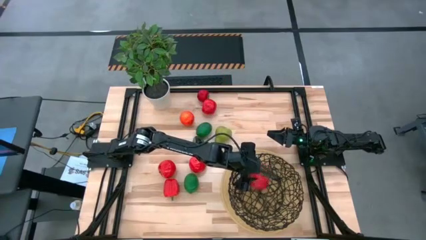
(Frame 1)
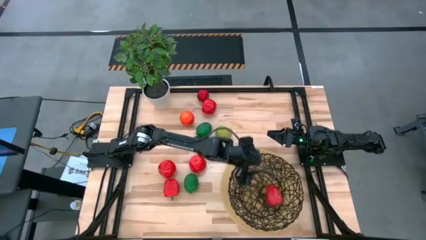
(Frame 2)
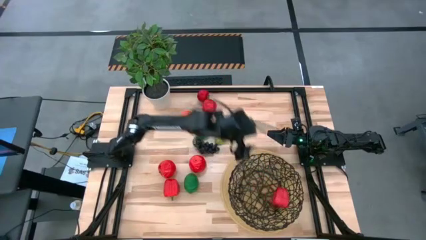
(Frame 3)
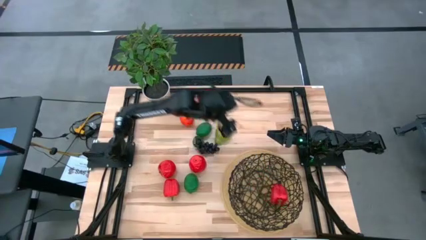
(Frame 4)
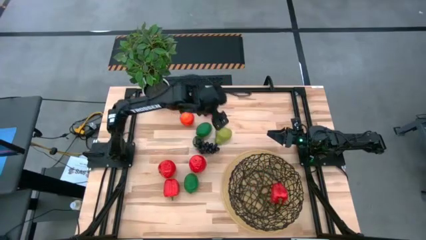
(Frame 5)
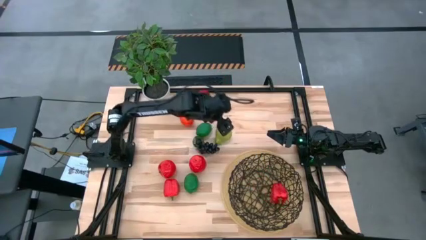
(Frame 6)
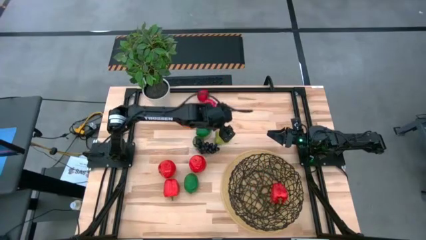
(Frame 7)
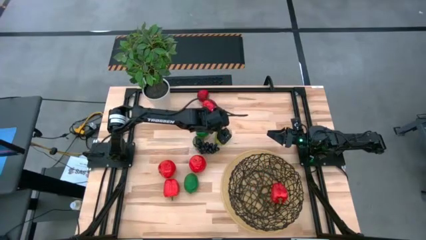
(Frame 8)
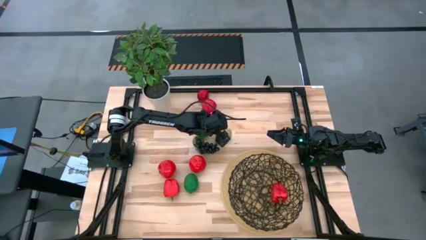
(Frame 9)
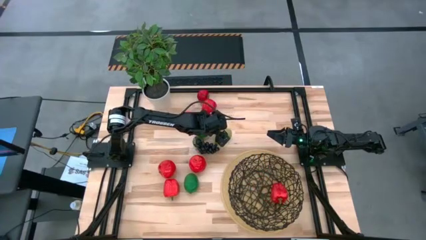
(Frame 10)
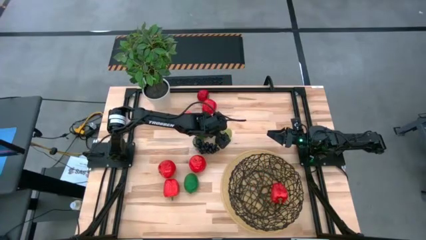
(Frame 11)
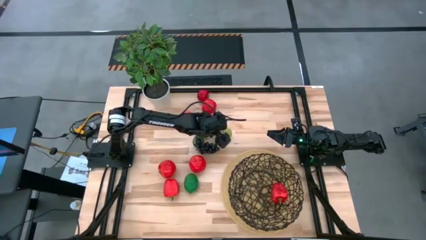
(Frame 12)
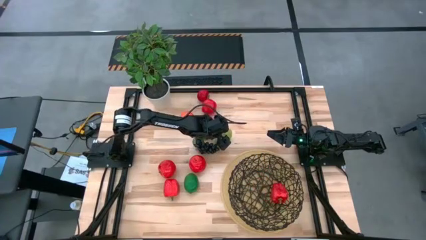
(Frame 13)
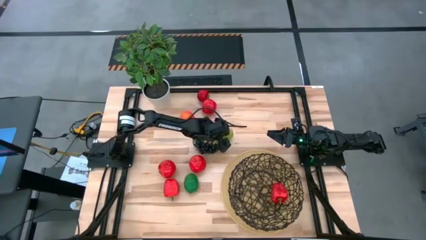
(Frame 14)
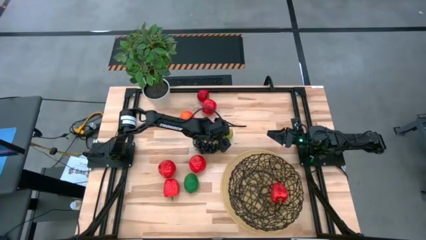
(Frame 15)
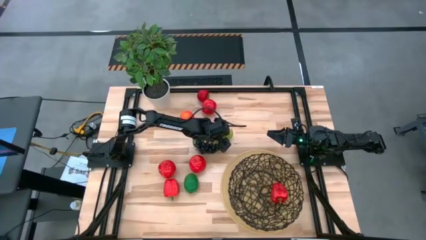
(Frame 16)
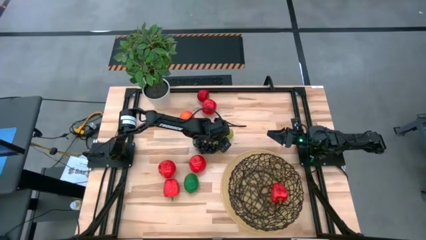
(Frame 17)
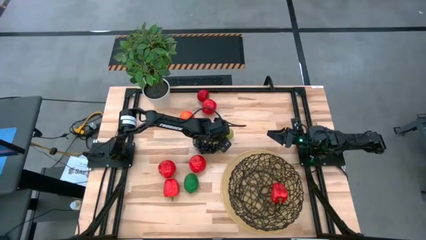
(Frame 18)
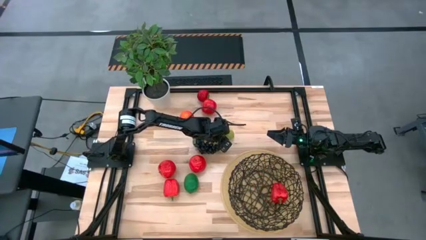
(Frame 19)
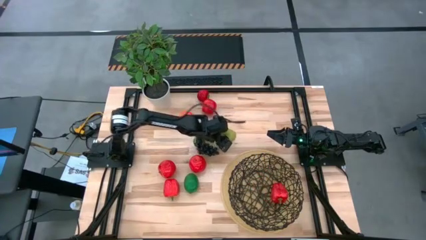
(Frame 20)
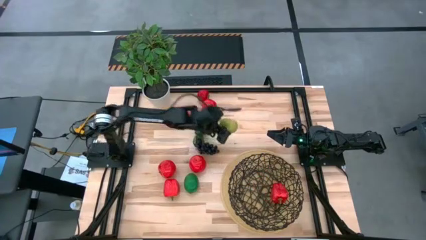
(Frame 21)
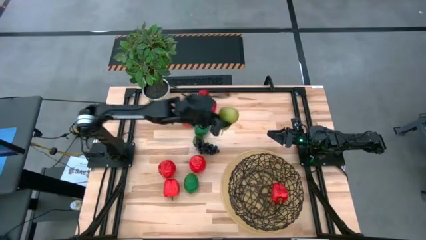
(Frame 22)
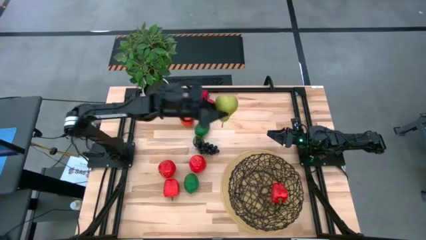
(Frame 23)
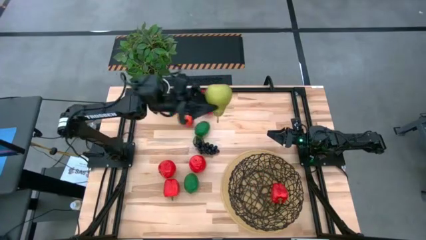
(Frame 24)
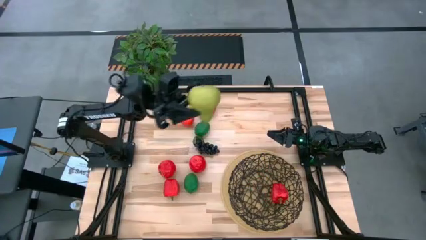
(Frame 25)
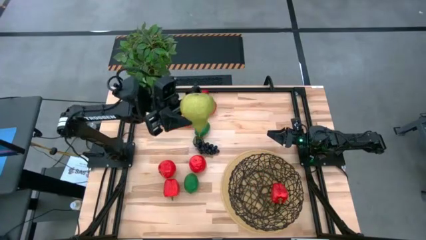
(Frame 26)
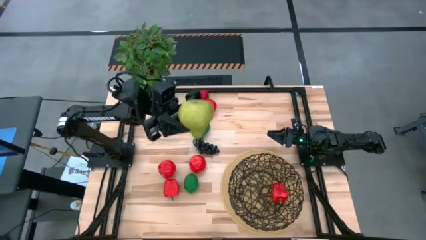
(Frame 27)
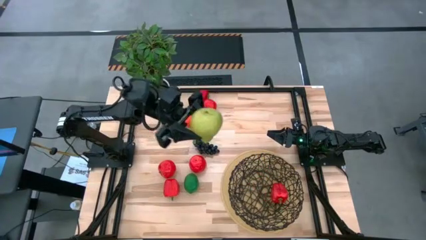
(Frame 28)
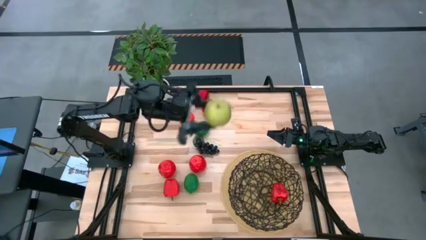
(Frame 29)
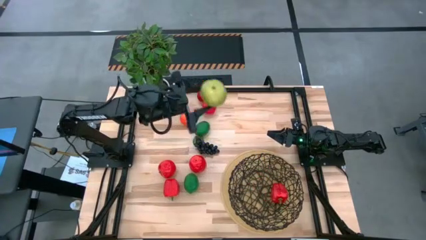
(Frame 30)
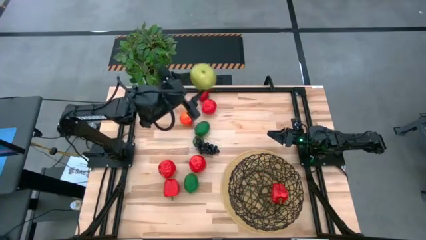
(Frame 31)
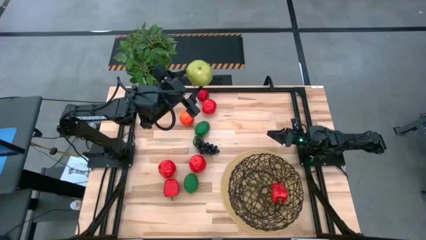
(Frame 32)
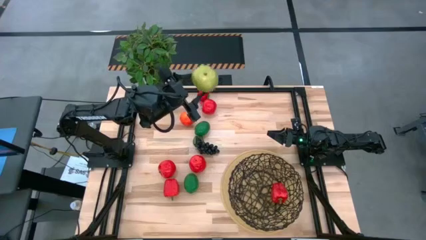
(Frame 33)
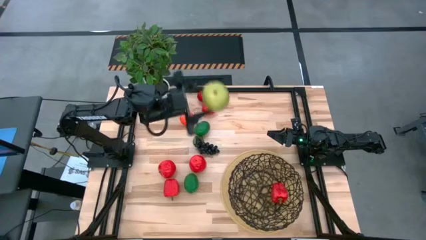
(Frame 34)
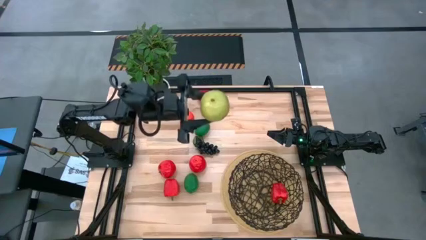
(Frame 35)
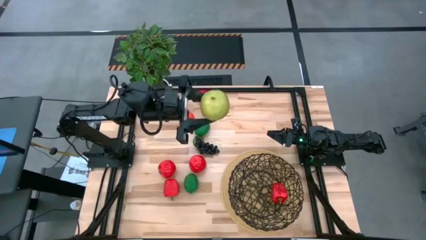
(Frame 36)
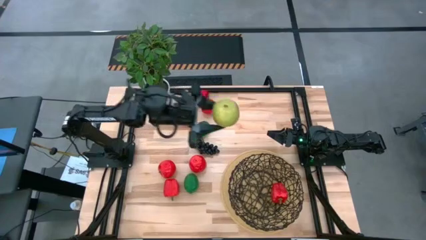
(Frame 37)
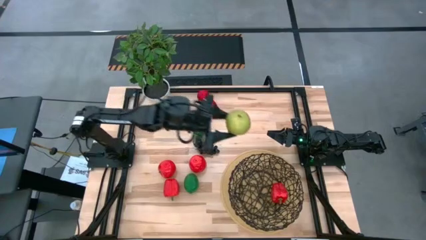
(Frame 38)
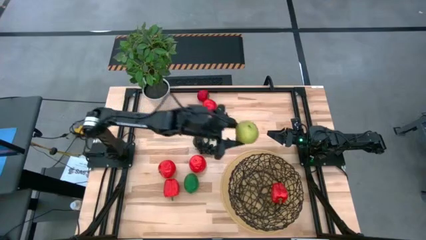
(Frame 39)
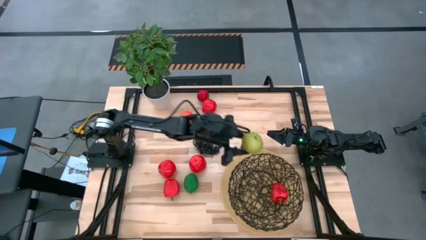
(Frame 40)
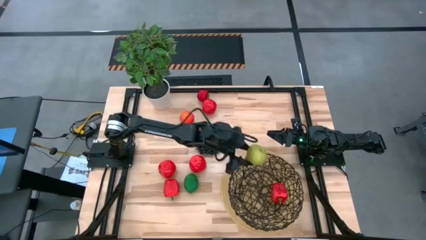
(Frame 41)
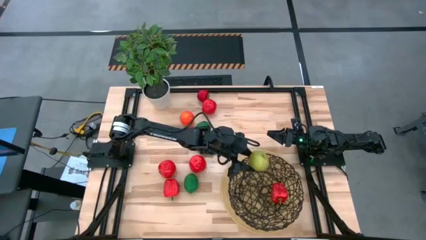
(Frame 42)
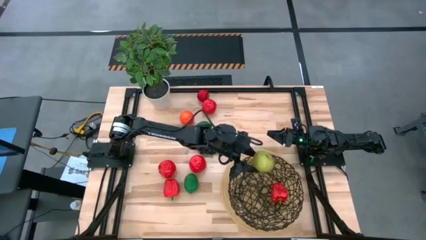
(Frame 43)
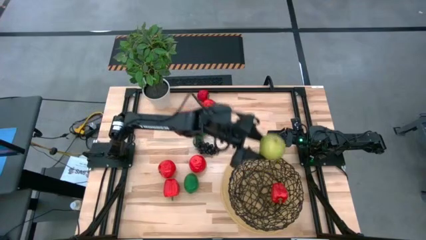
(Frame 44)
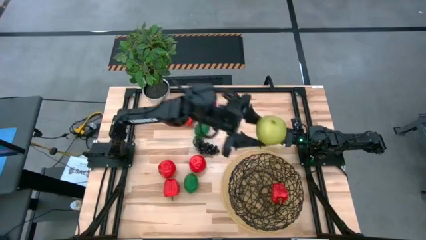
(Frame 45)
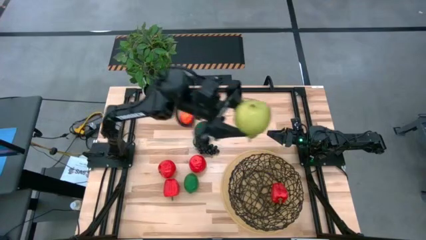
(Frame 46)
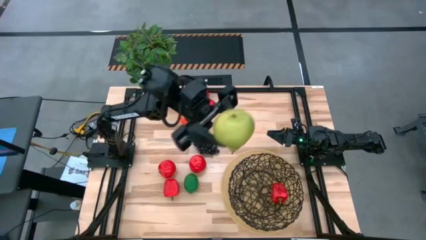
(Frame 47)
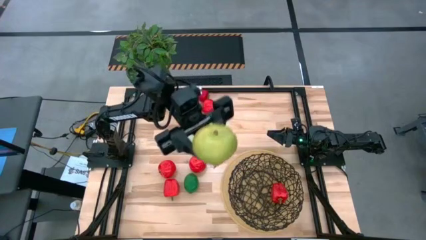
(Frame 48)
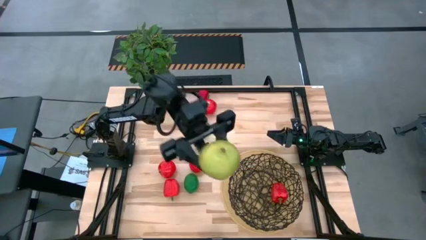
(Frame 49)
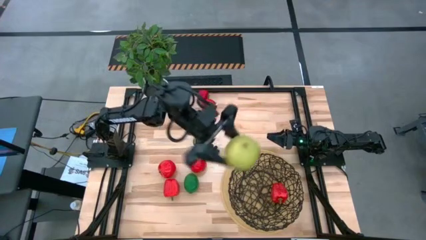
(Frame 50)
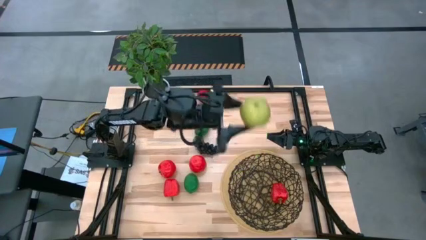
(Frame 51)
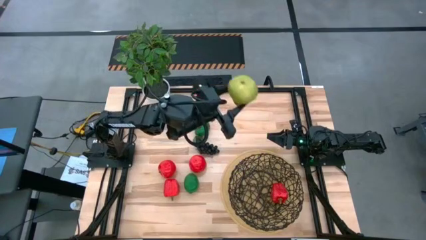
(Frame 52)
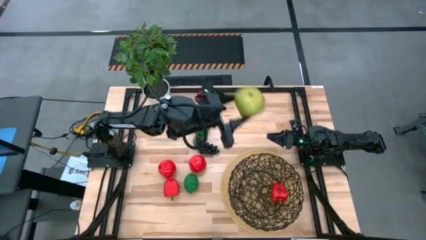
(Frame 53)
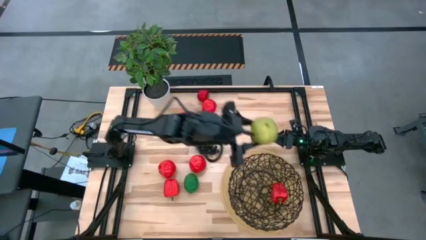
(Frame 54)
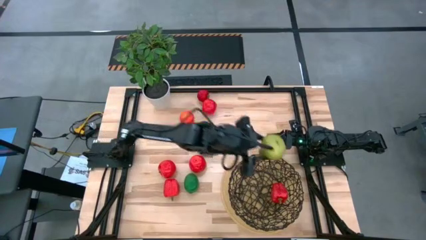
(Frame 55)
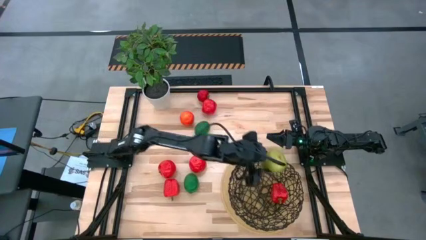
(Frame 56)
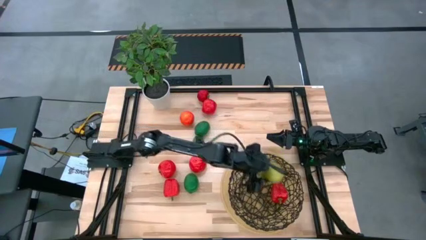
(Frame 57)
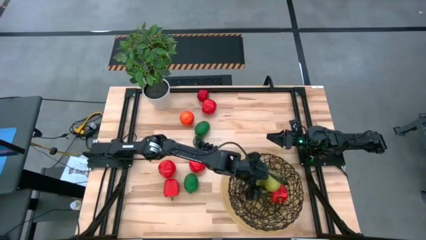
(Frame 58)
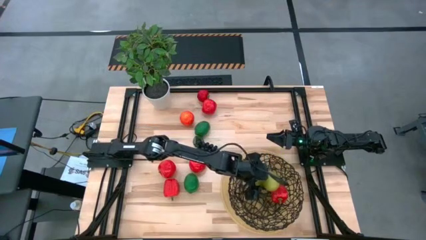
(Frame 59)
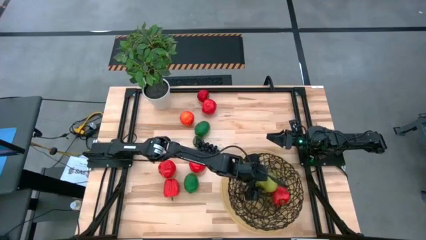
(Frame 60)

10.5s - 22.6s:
Task: Build produce basket
Put the green pear into the black wire basket

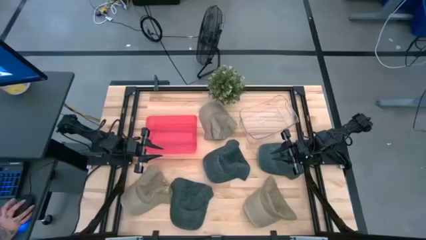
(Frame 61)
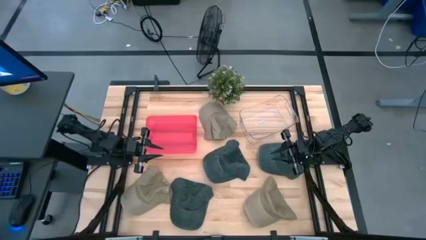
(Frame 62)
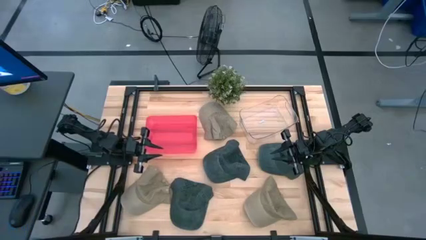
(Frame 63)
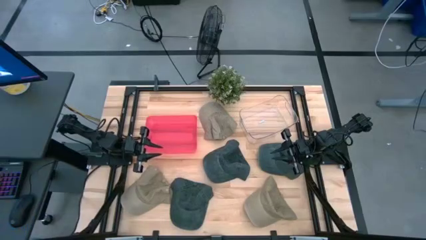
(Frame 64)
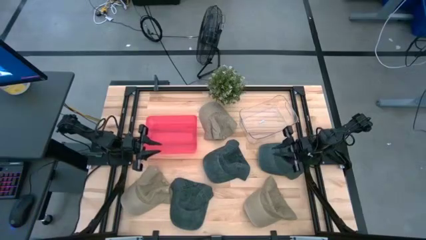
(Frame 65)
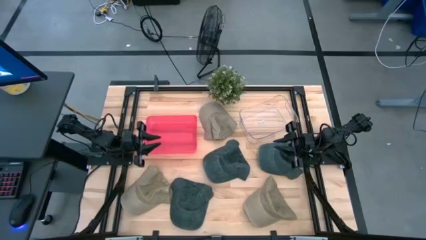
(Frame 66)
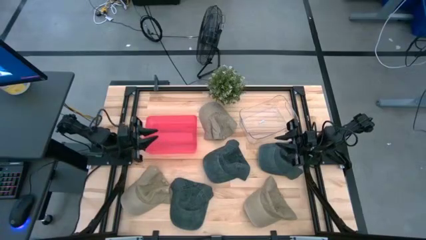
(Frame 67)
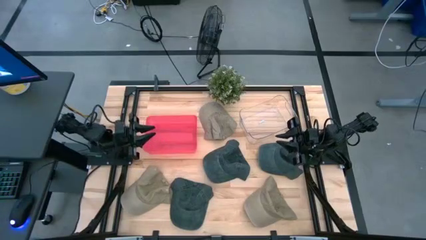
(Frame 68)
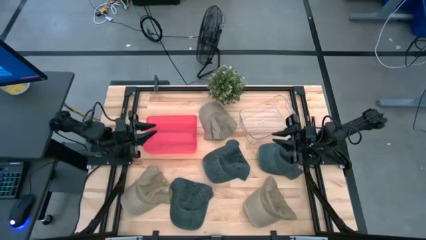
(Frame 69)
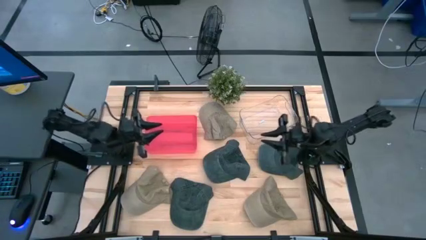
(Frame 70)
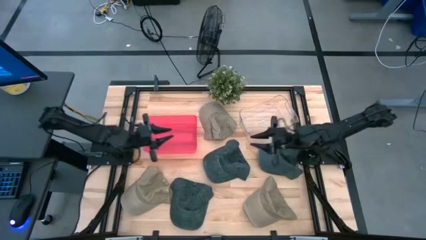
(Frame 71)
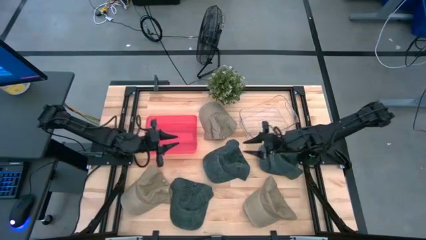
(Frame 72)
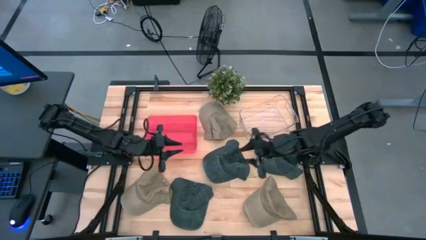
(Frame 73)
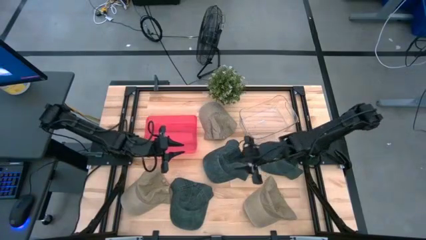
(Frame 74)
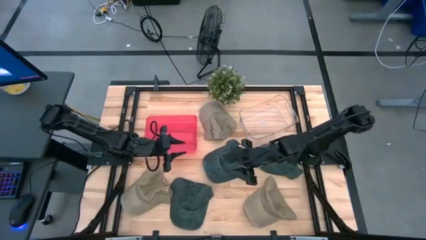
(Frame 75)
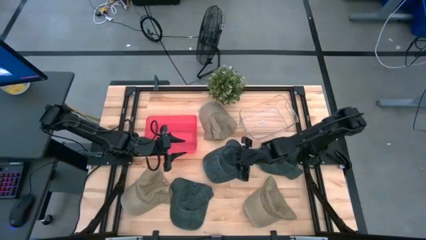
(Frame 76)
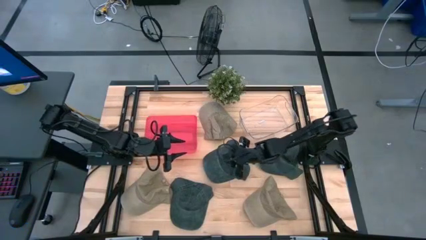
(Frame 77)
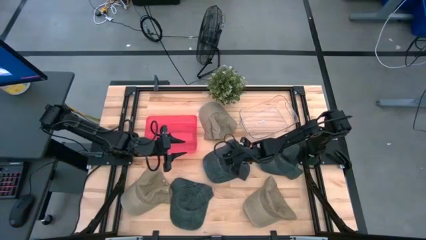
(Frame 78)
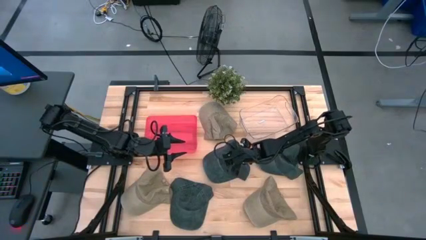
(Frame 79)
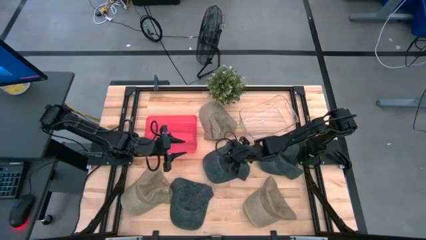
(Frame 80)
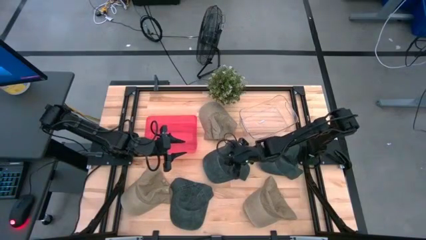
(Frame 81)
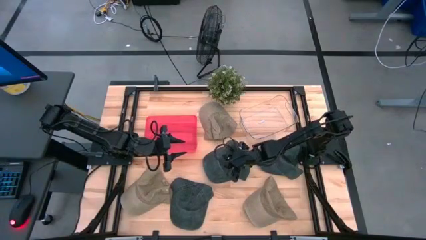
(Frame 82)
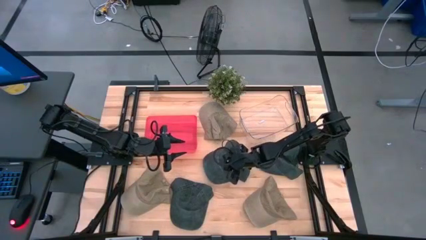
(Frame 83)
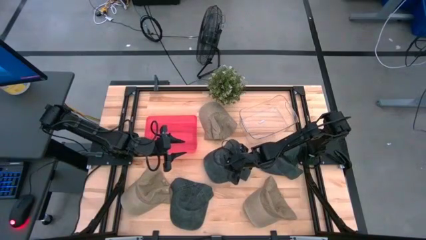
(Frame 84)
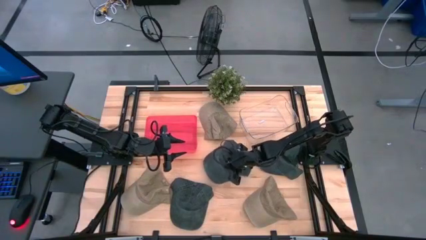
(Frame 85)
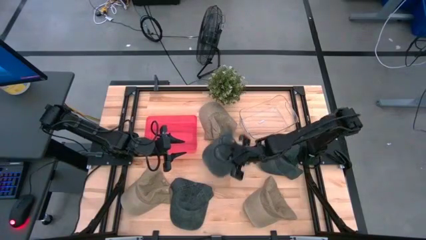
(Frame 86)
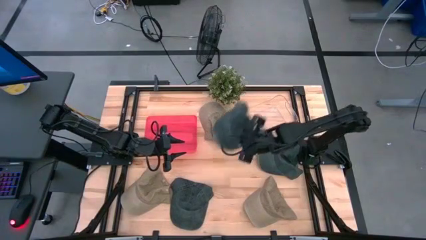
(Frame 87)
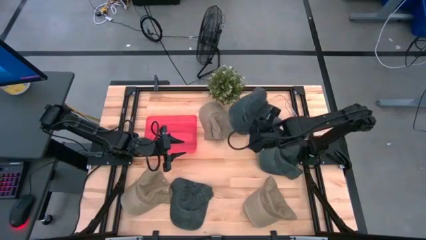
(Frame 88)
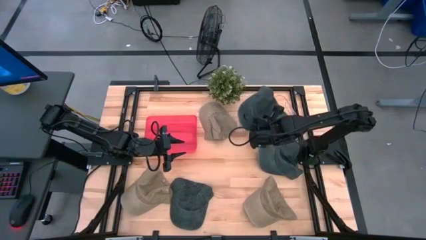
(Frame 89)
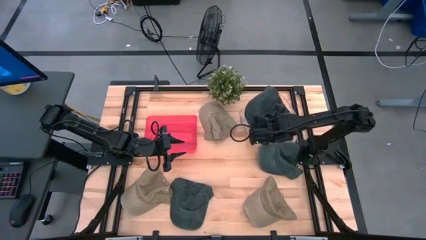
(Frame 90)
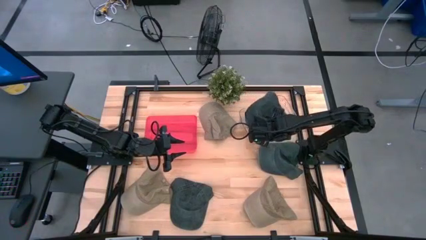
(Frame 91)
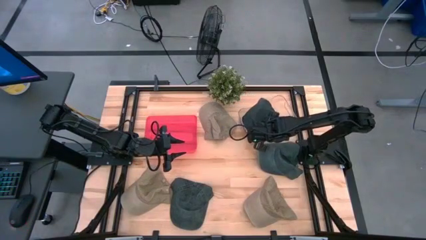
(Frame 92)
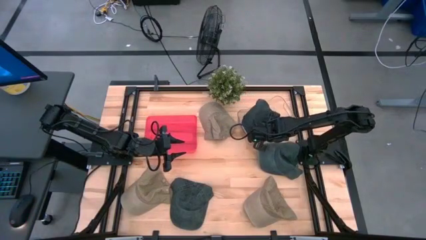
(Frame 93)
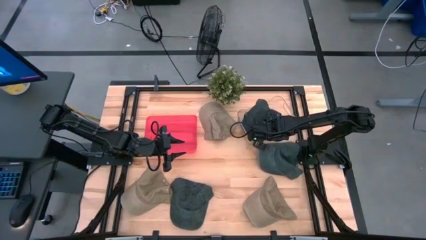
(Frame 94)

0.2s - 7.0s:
Task: Pick & Place hat
Put the top left black cap into the transparent bin
